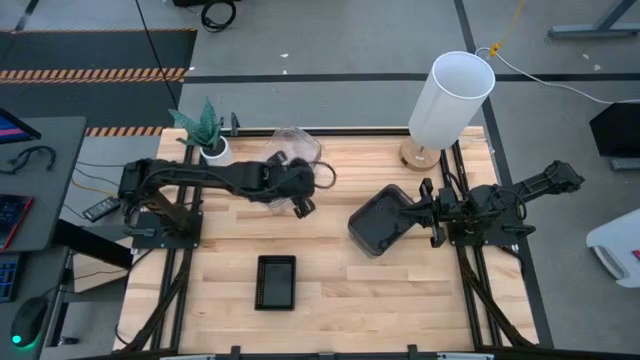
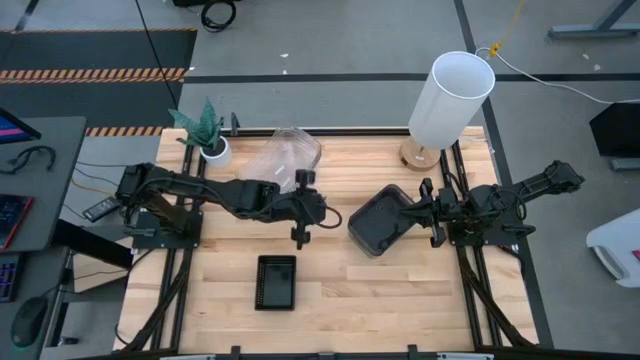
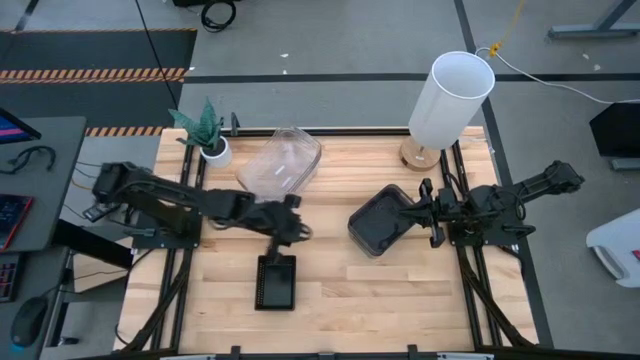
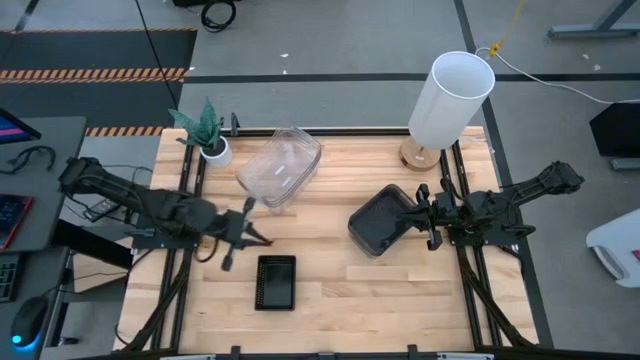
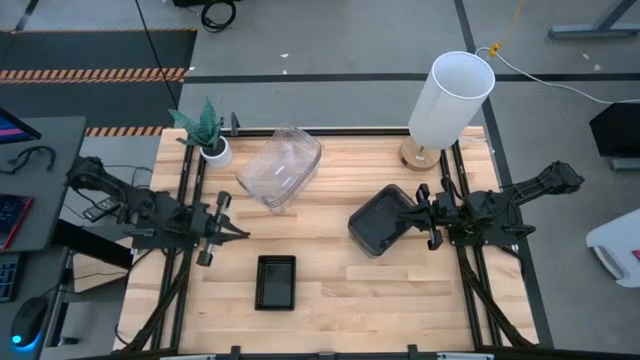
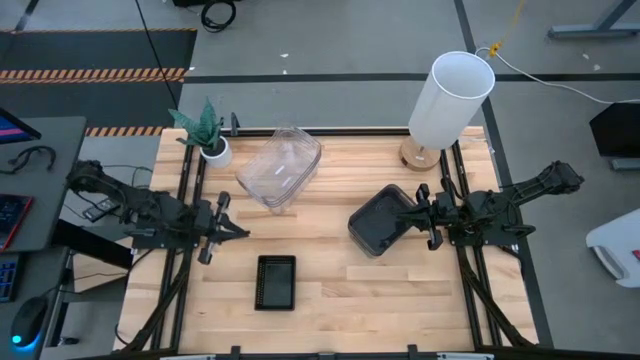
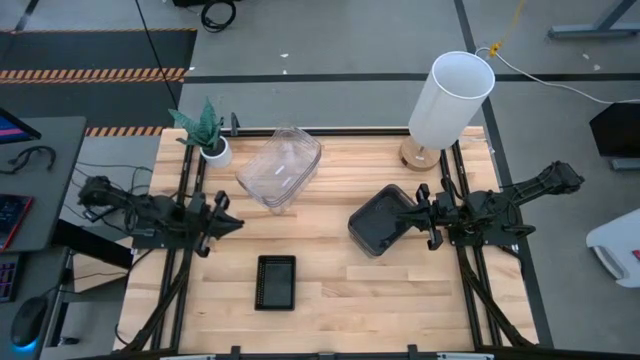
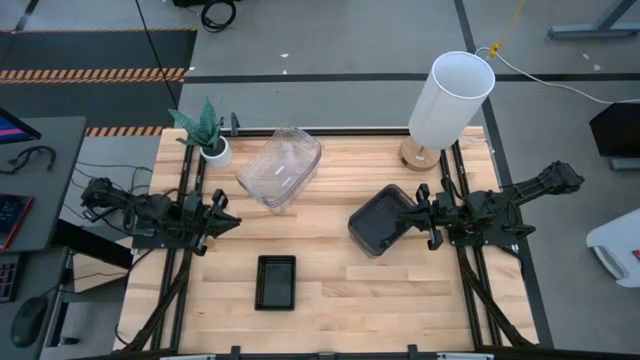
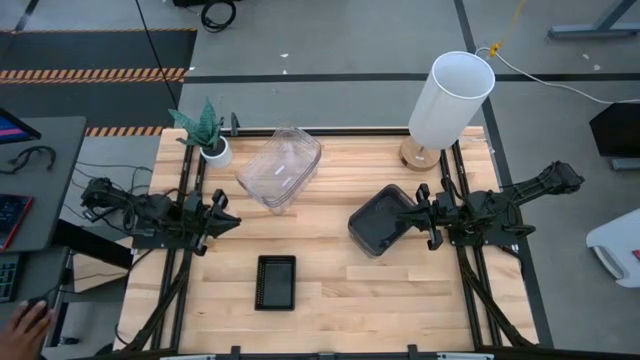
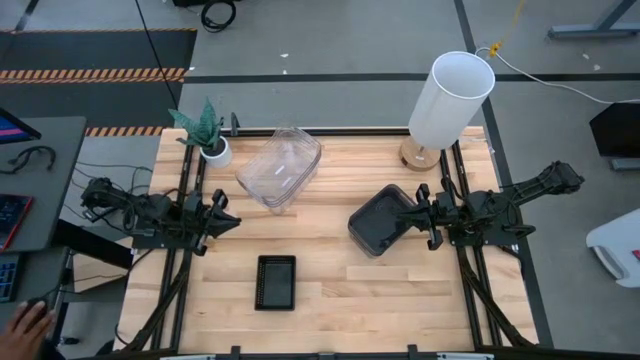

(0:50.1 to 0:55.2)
Return to Home Position

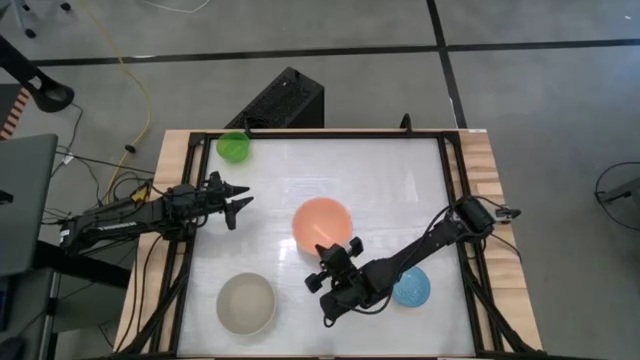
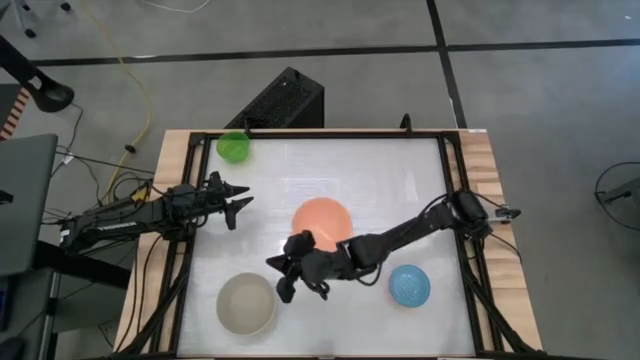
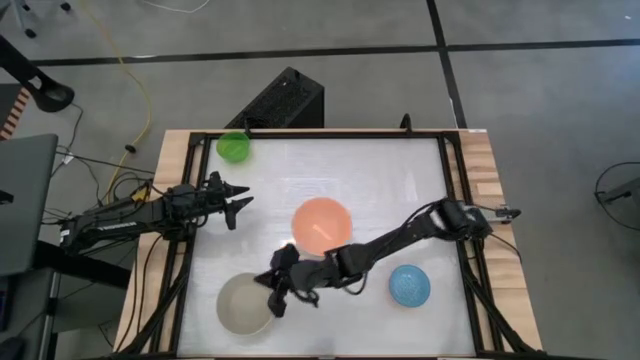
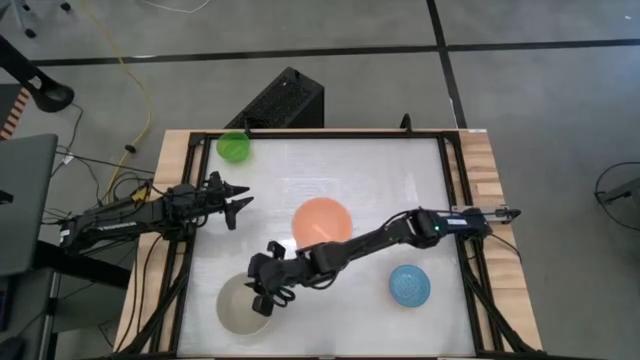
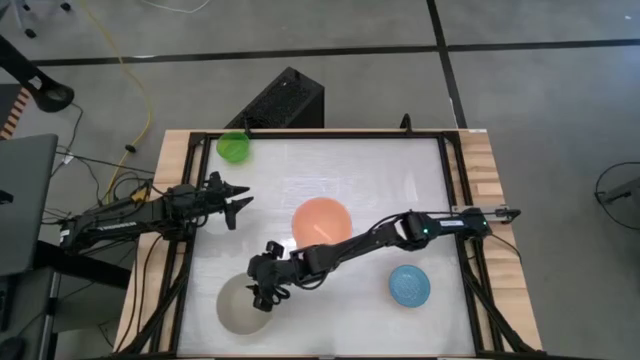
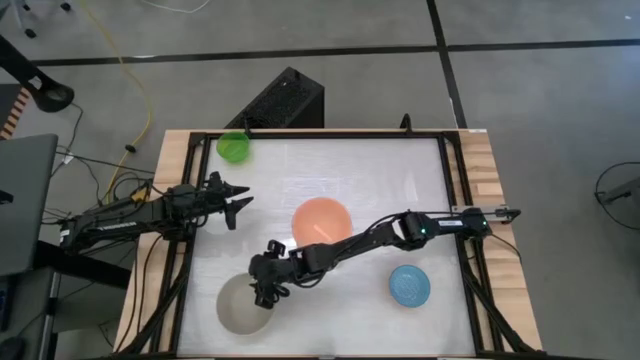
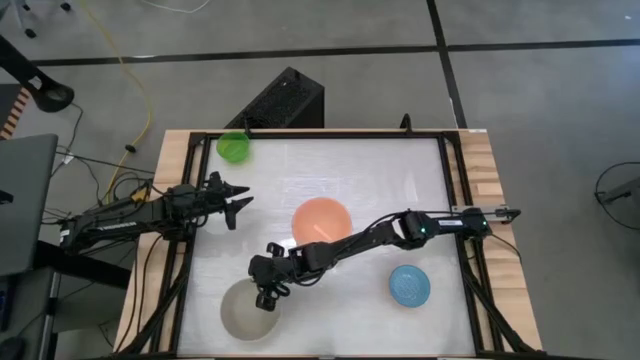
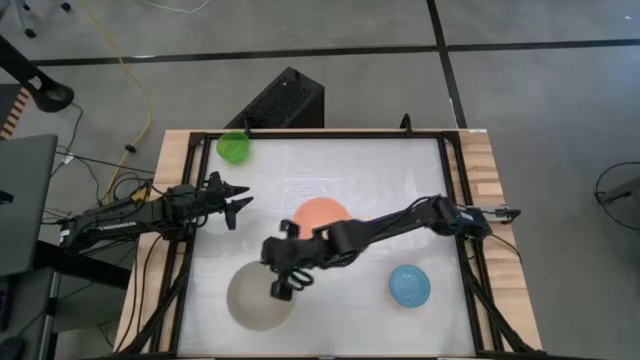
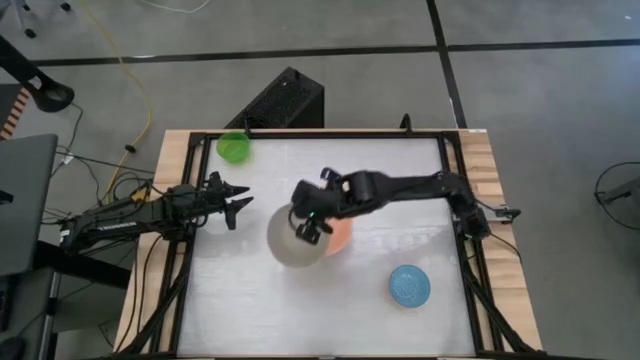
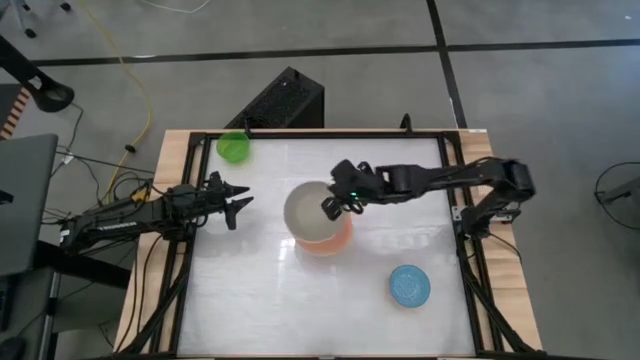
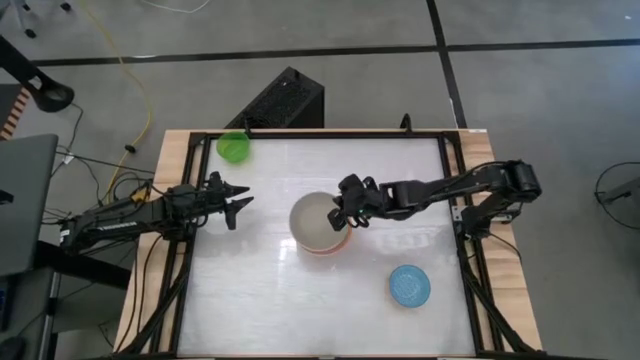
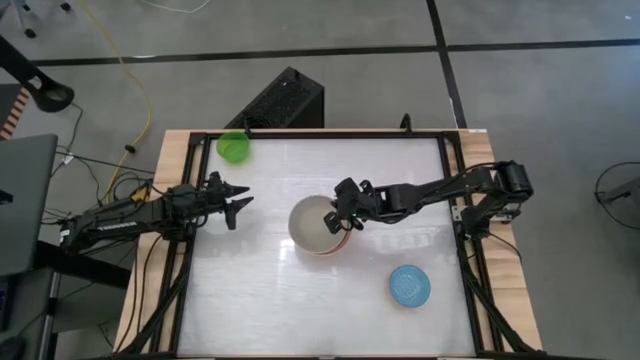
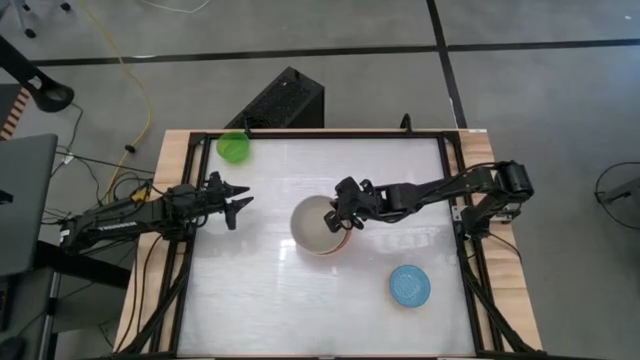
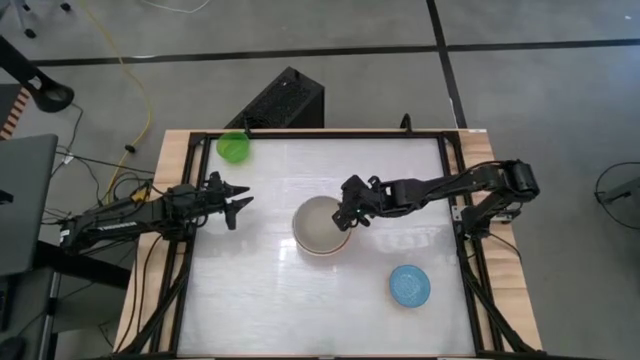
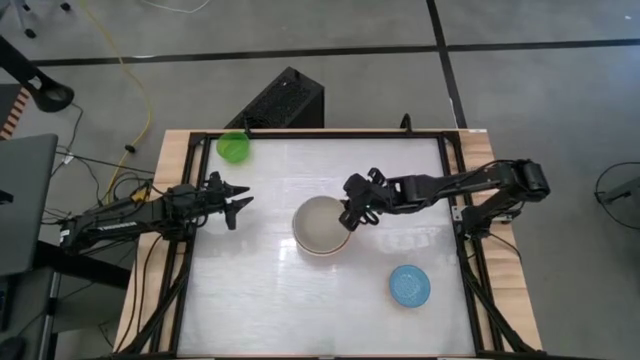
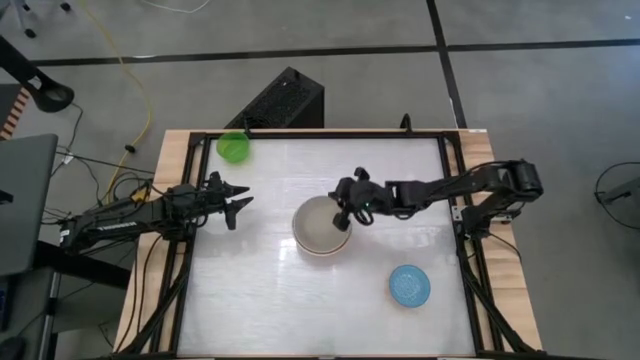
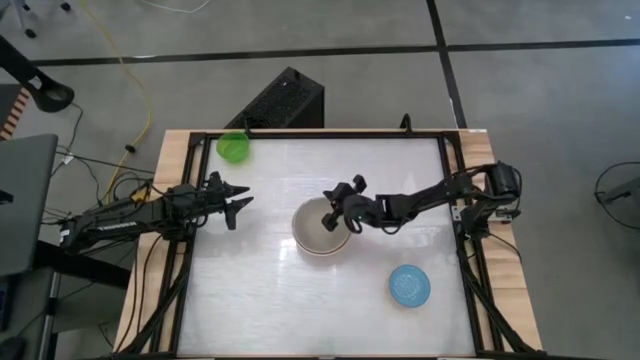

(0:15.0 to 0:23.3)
Stack the gray bowl on top of the pink bowl

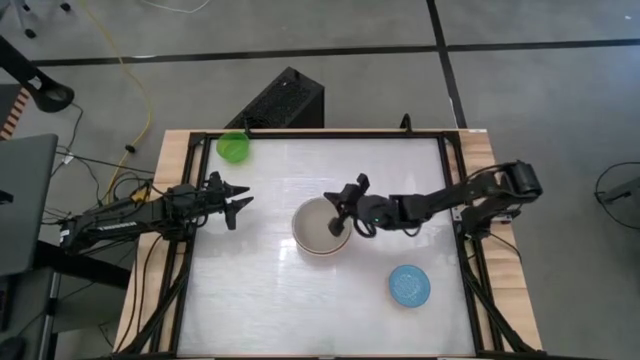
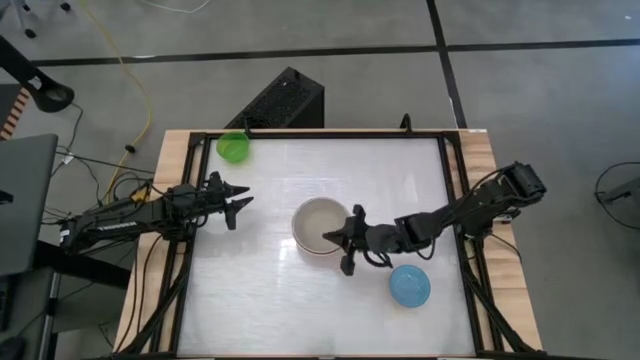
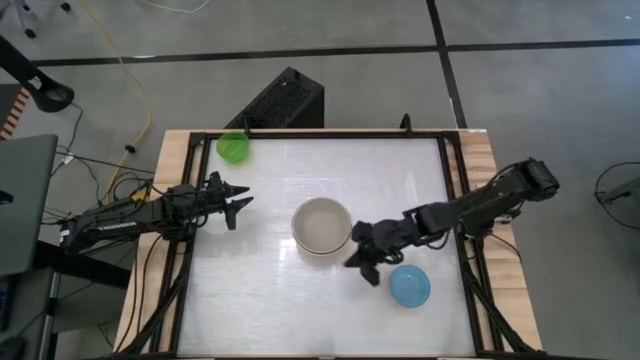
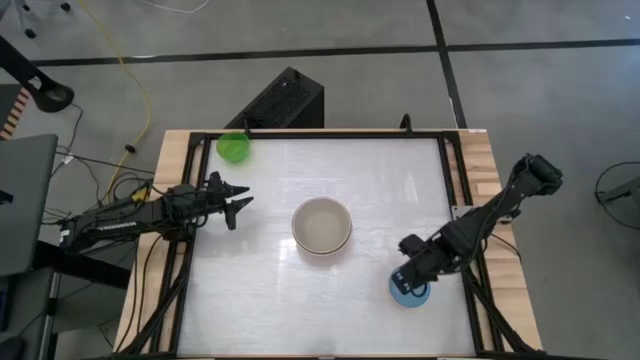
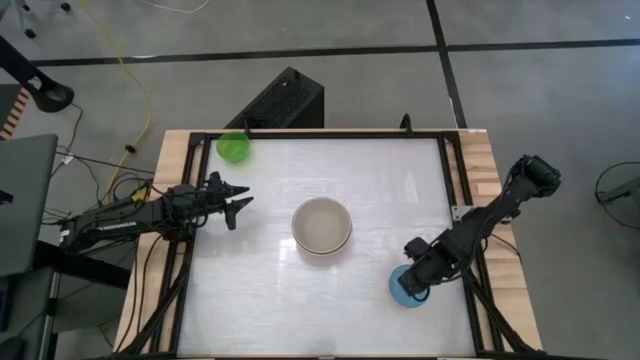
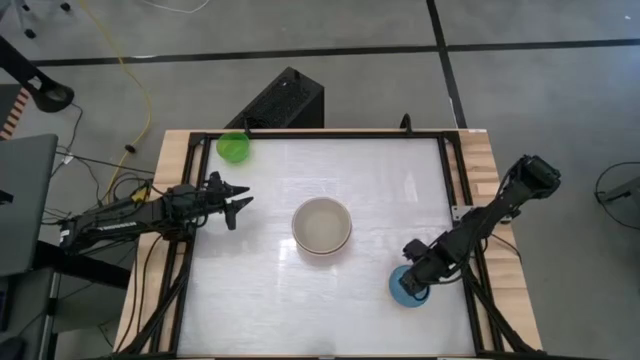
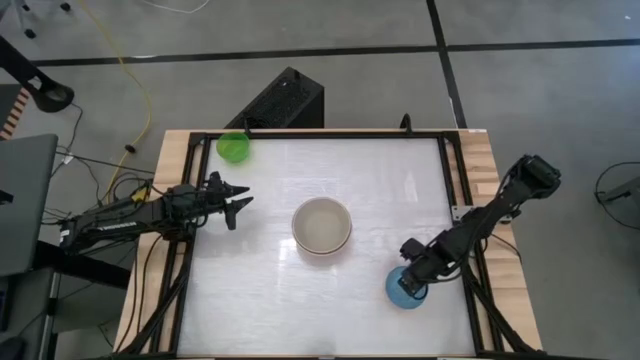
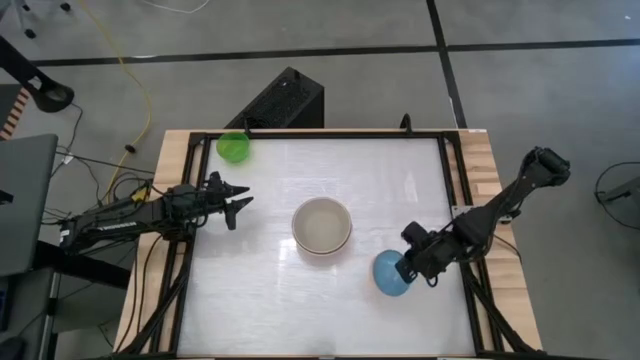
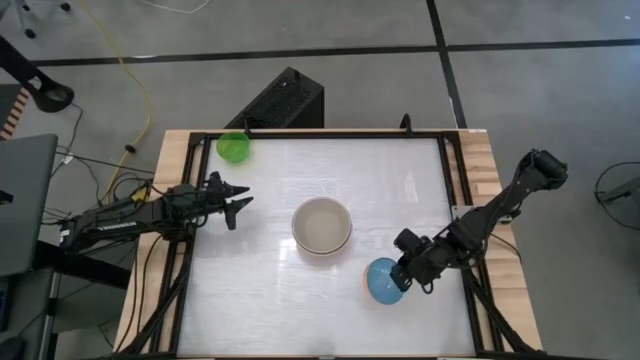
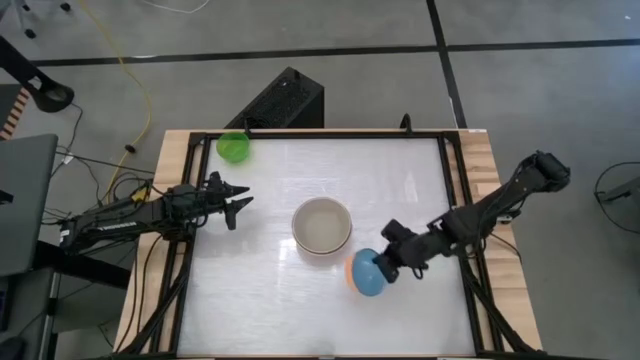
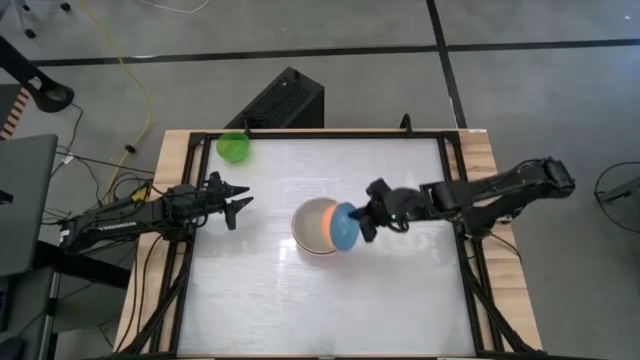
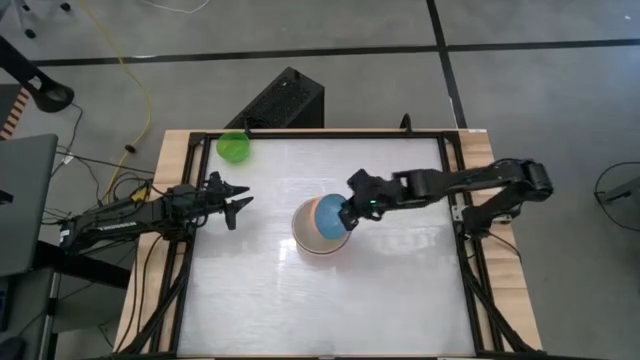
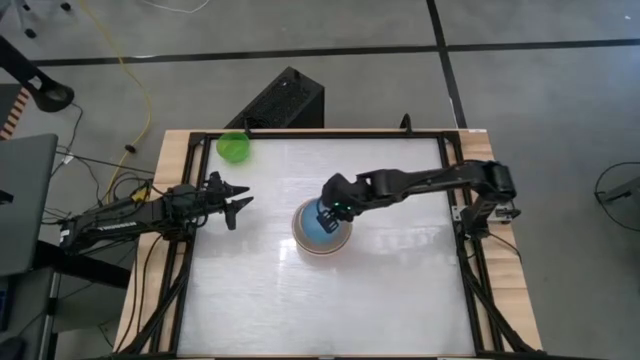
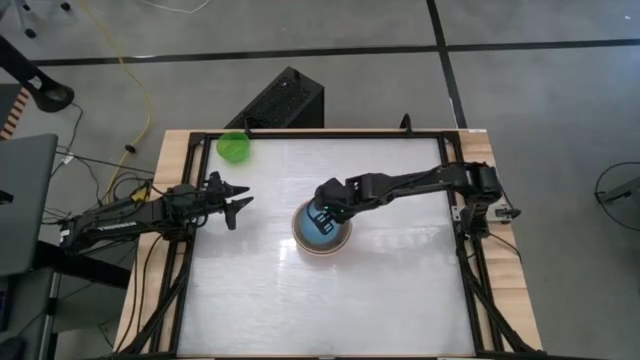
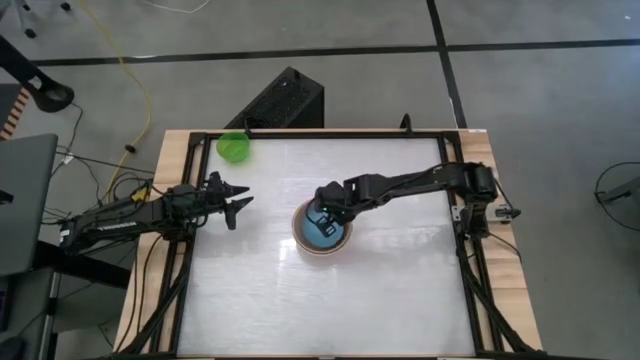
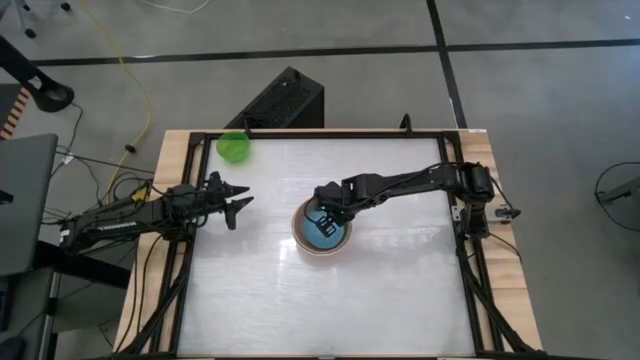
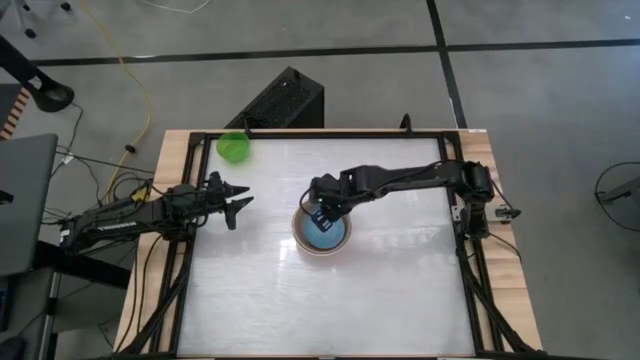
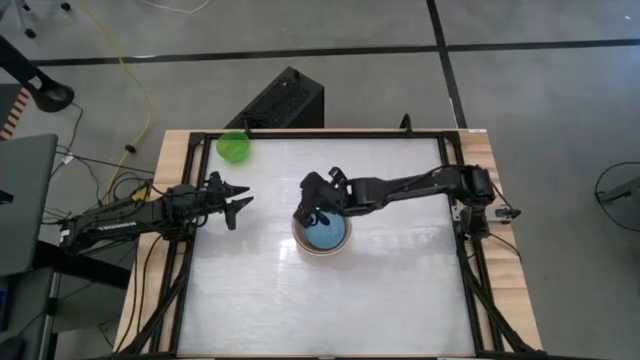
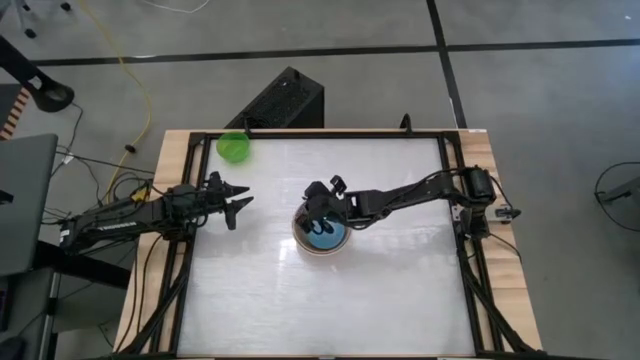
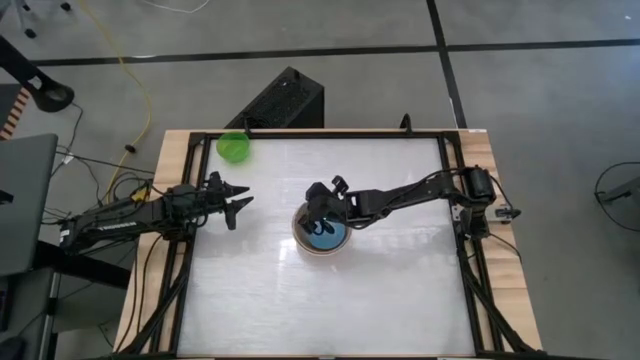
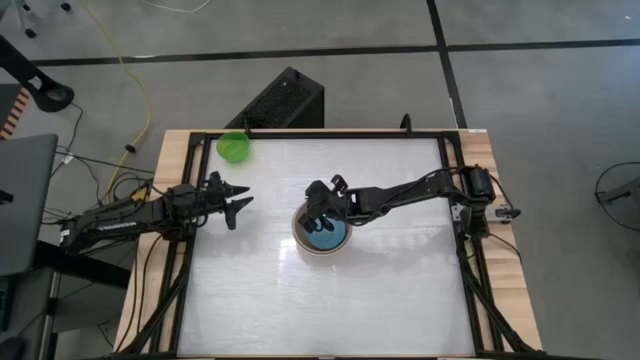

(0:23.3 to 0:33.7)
Stack the blue bowl on top of the gray bowl
